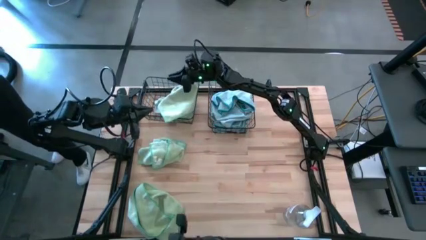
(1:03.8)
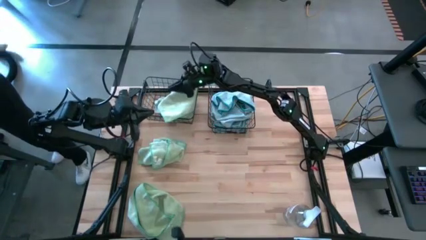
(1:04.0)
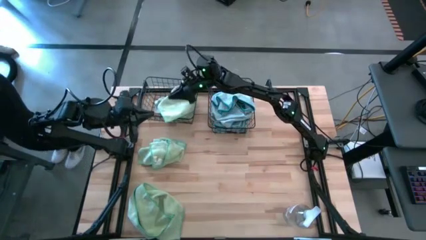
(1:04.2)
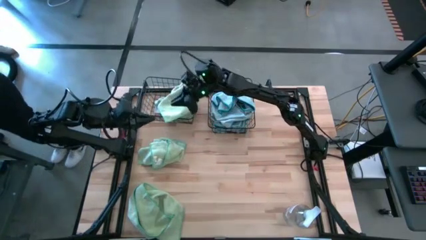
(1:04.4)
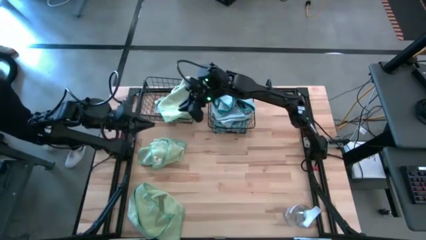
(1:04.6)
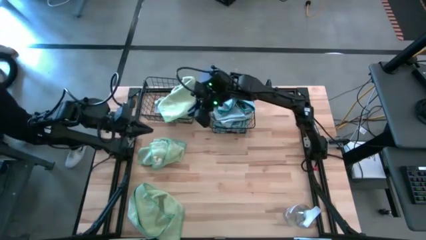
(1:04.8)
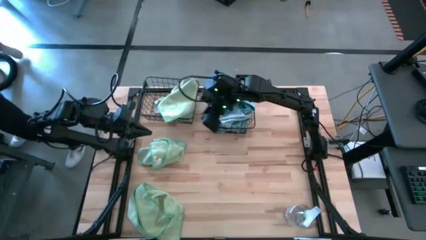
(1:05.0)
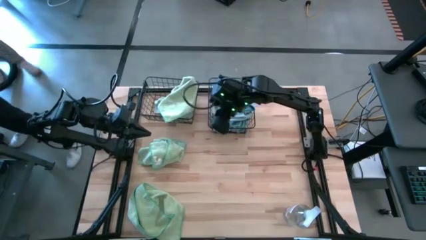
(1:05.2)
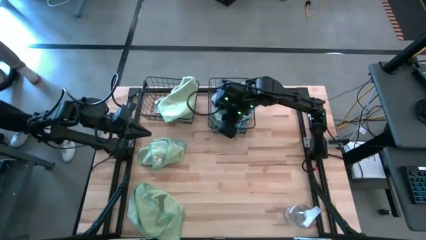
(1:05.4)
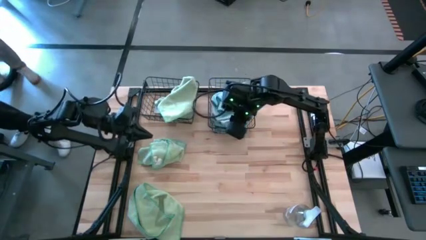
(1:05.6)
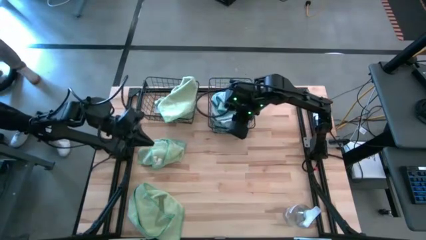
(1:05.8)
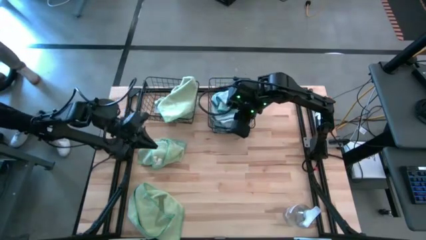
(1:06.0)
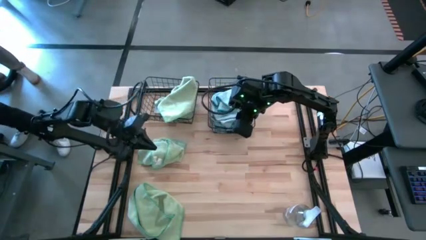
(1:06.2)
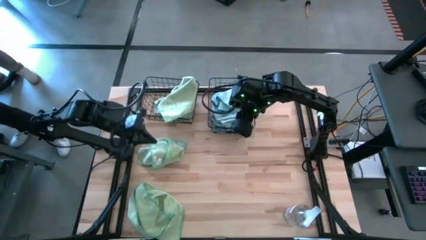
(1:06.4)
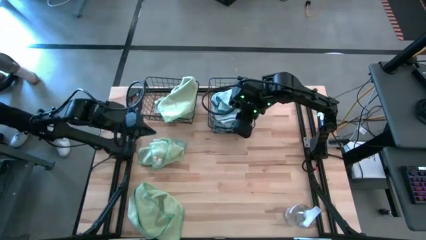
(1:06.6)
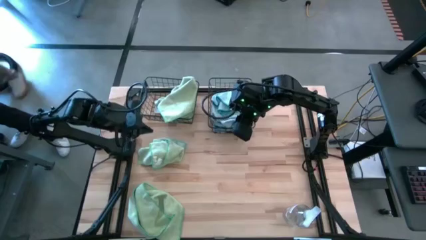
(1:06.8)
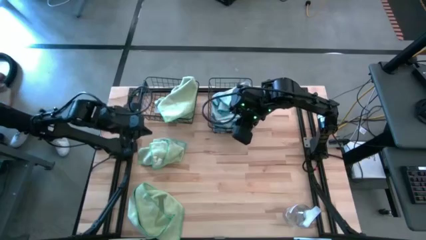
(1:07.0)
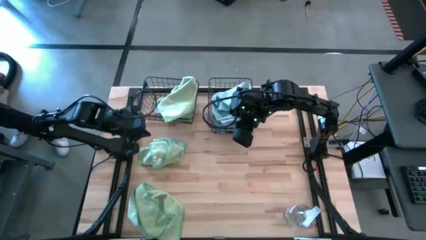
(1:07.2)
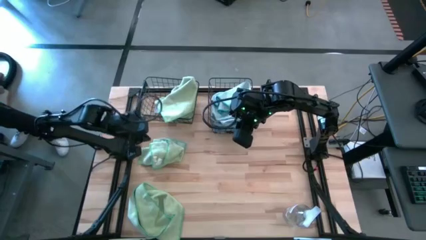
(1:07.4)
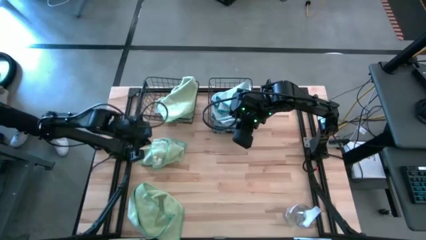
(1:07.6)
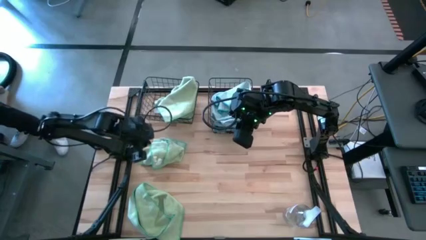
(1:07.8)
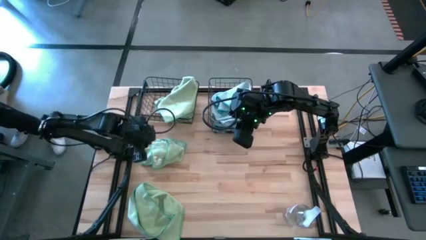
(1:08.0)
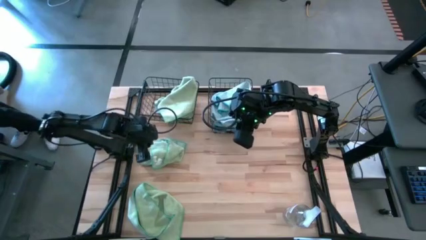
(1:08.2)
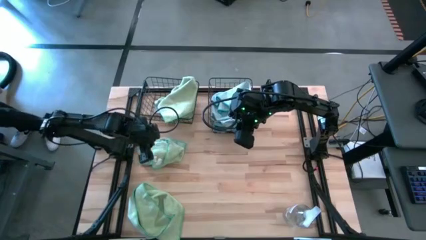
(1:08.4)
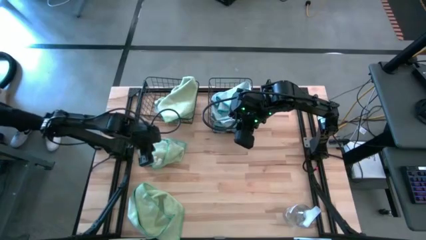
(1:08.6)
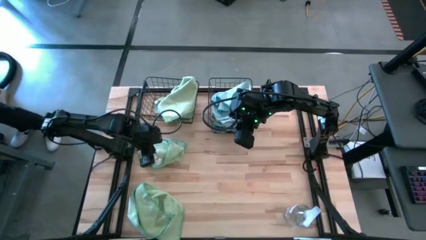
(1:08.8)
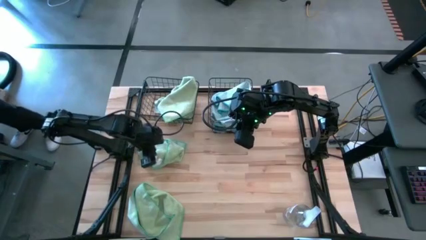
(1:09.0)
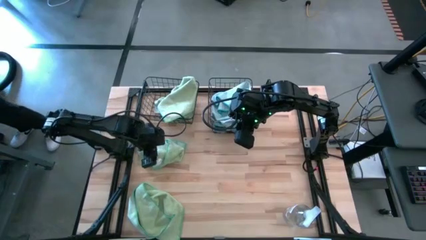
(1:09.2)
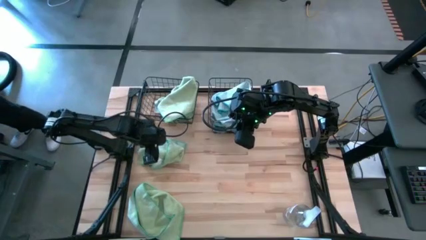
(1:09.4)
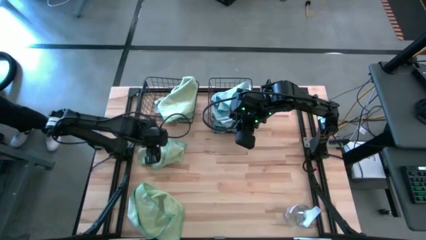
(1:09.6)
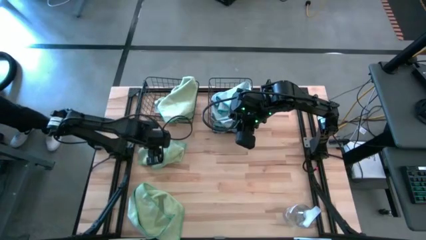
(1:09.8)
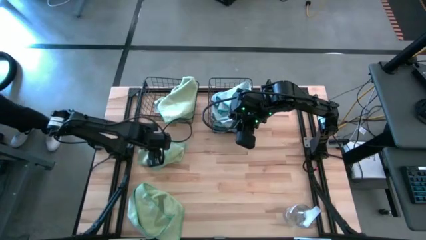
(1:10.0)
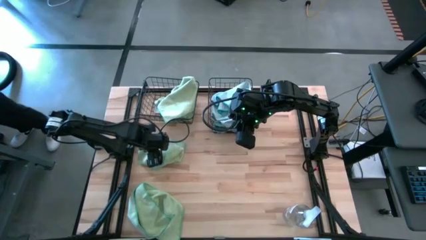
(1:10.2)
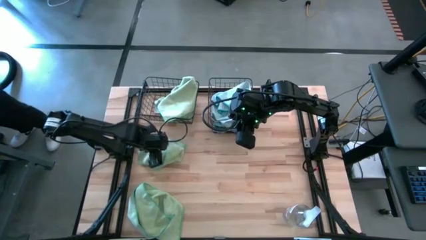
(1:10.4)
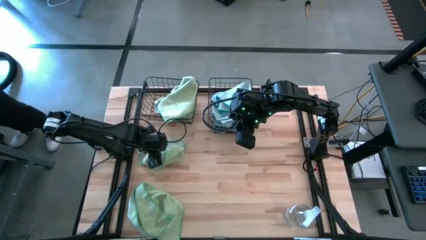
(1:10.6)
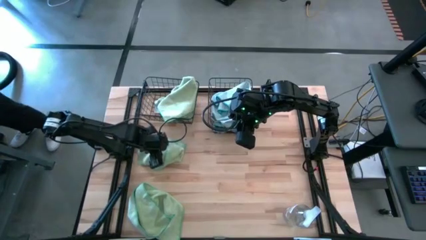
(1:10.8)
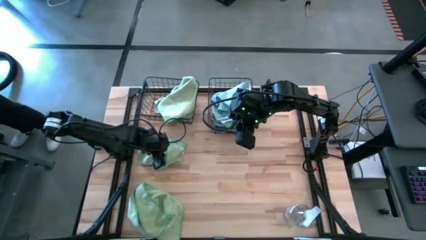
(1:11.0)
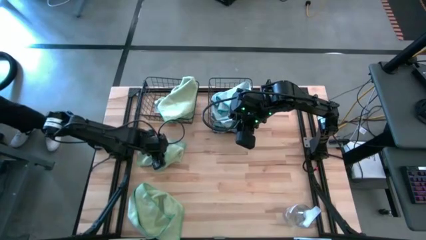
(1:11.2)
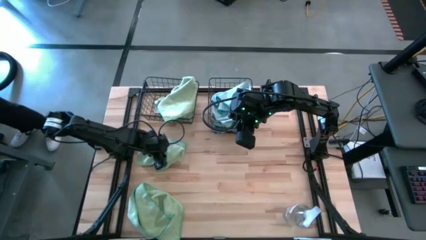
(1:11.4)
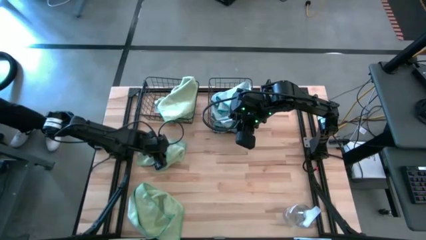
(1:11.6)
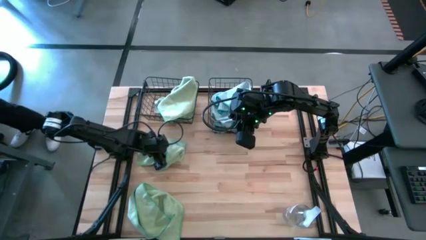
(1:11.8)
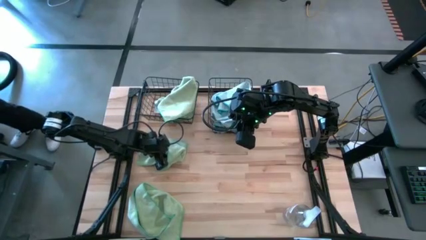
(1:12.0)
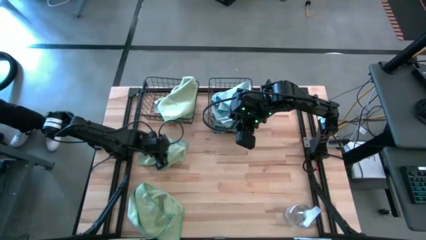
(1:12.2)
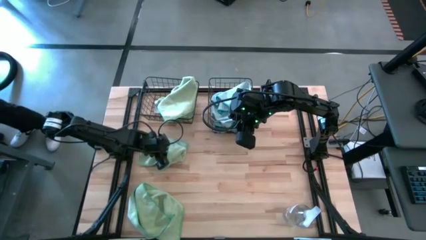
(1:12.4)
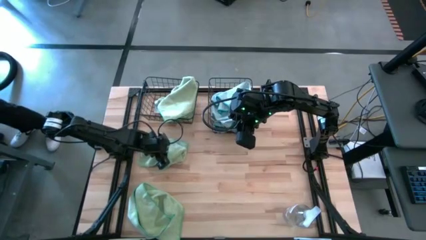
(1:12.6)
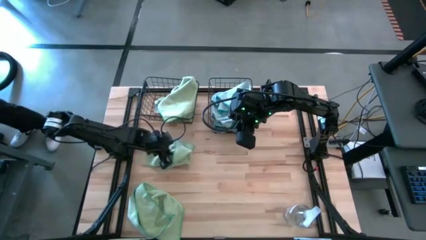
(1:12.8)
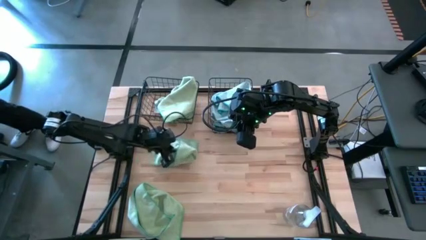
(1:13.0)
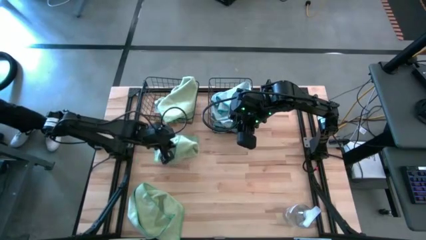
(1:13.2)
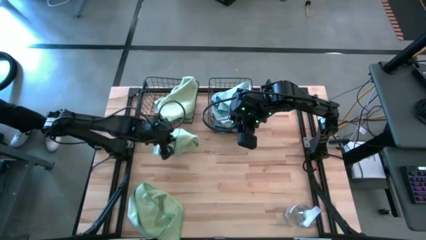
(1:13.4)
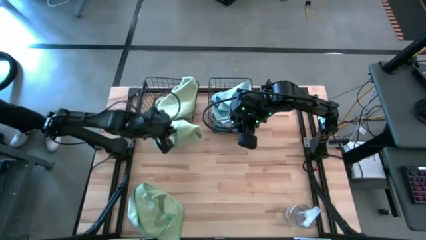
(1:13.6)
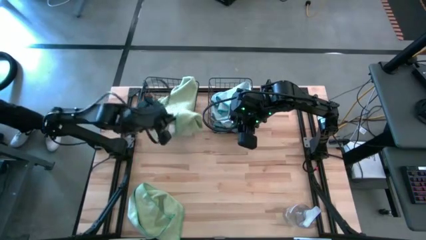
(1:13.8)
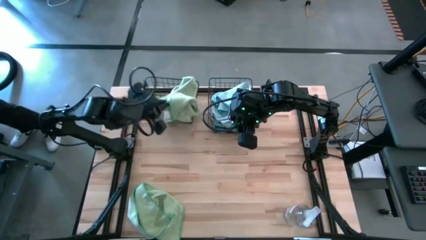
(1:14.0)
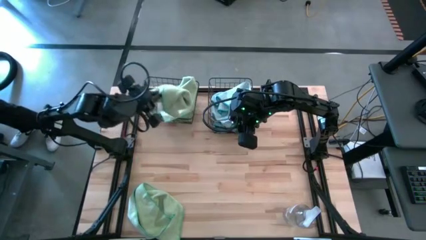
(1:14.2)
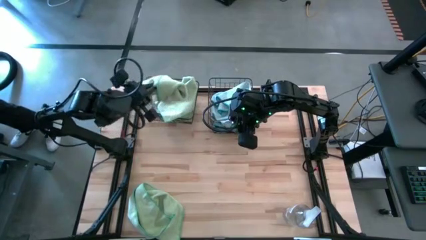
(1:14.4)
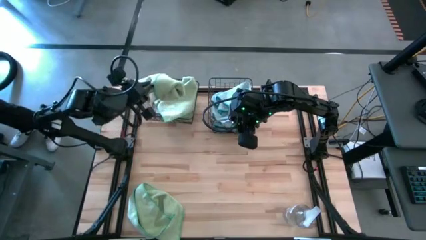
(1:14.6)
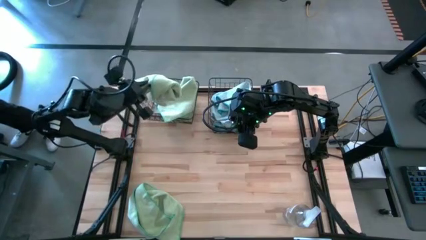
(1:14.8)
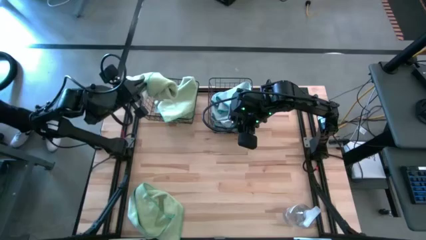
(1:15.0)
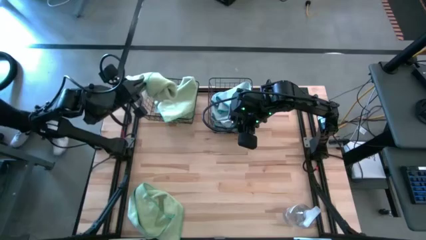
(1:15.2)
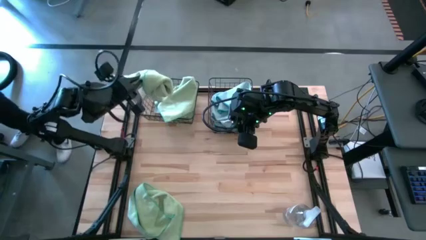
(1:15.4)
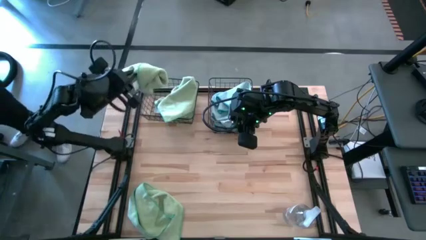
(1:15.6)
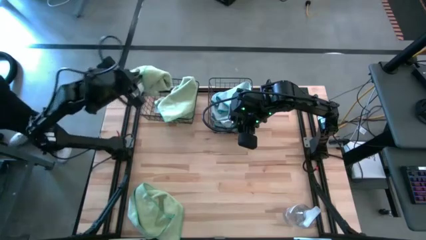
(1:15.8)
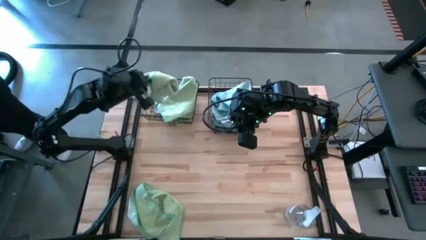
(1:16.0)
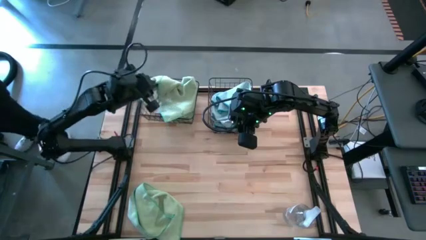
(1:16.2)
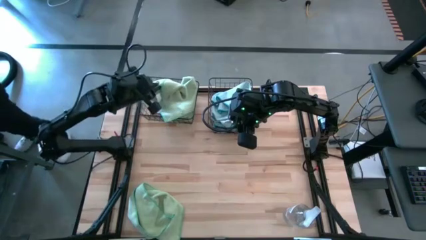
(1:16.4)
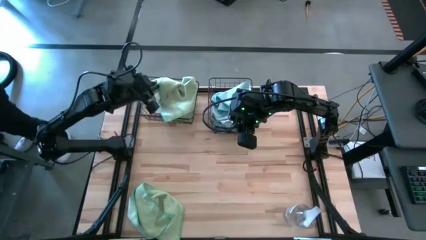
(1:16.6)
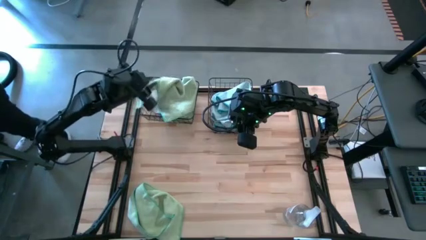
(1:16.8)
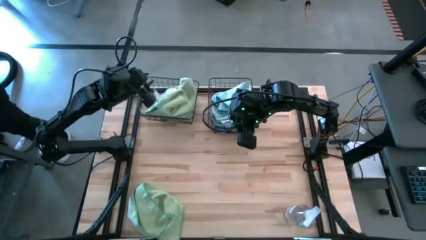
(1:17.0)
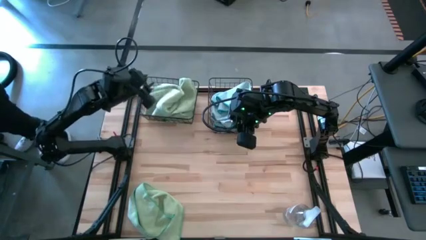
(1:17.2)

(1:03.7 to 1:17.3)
Task: Sort microfiber towel by color & place in baskets
Put the green towel into the left wire basket

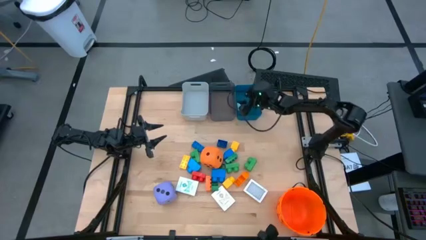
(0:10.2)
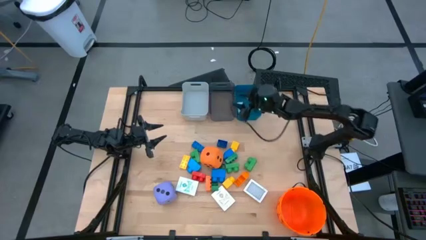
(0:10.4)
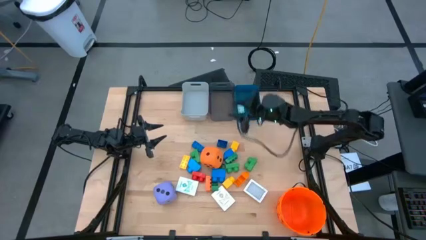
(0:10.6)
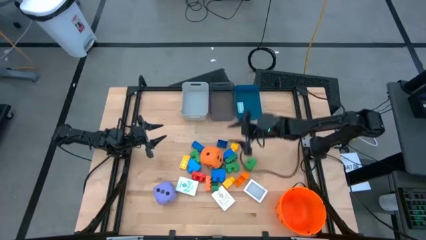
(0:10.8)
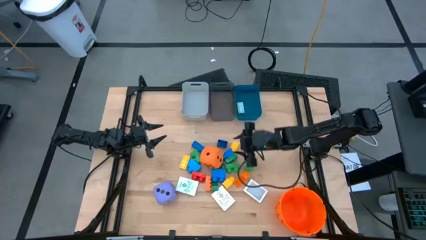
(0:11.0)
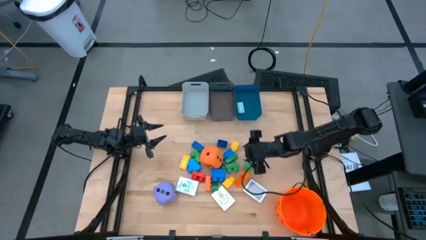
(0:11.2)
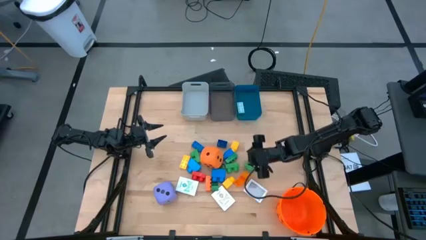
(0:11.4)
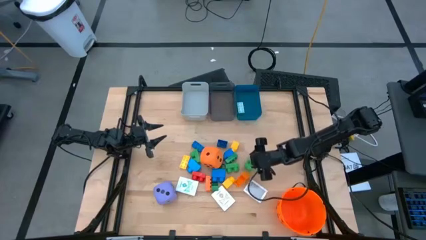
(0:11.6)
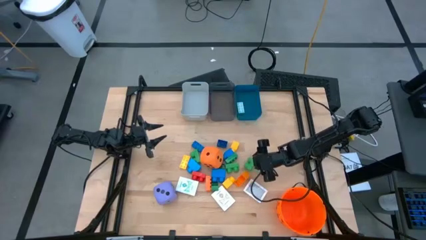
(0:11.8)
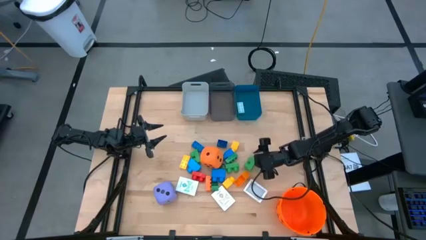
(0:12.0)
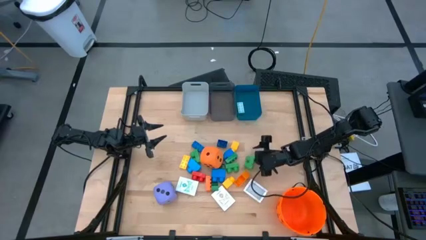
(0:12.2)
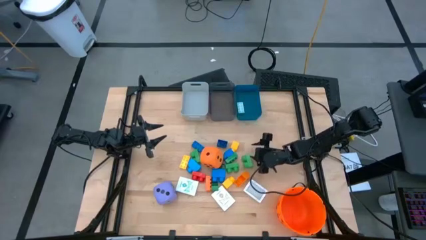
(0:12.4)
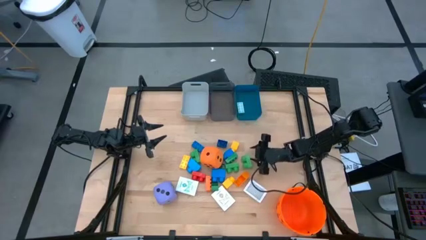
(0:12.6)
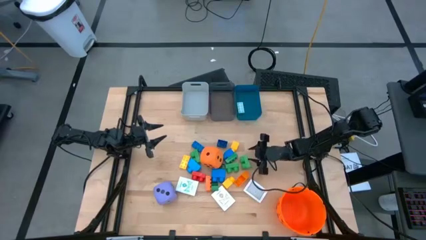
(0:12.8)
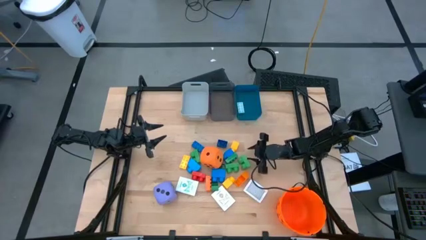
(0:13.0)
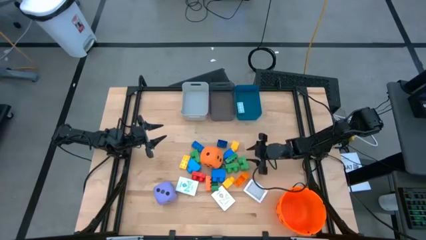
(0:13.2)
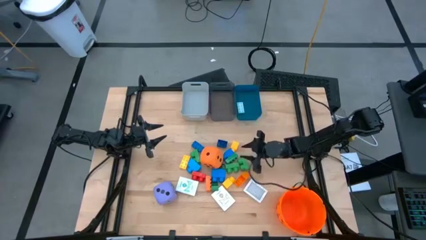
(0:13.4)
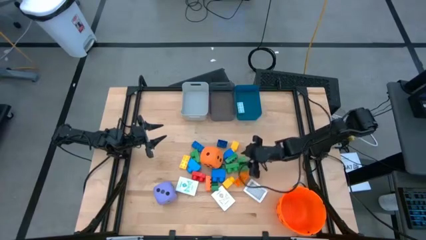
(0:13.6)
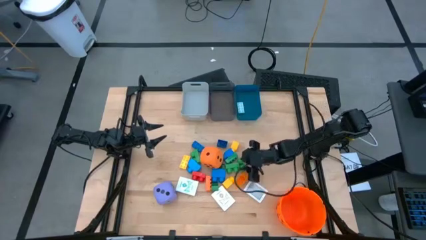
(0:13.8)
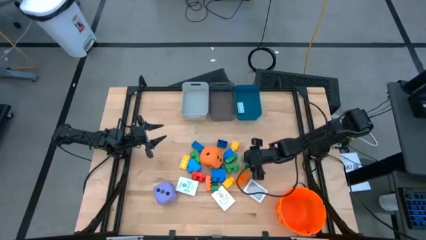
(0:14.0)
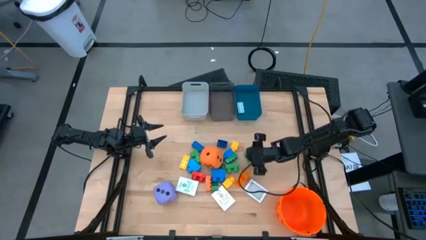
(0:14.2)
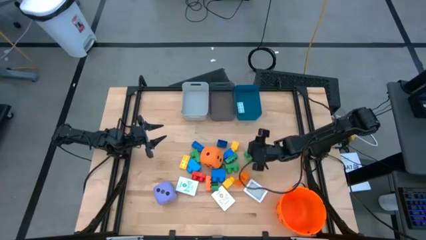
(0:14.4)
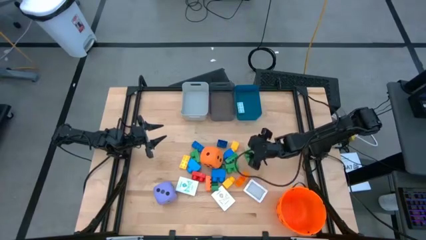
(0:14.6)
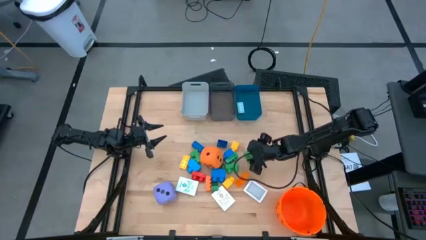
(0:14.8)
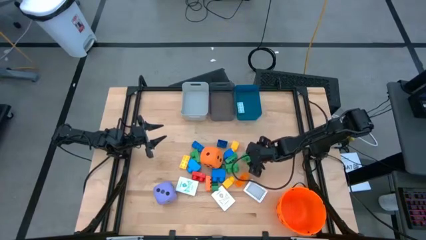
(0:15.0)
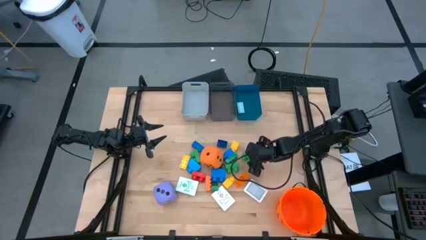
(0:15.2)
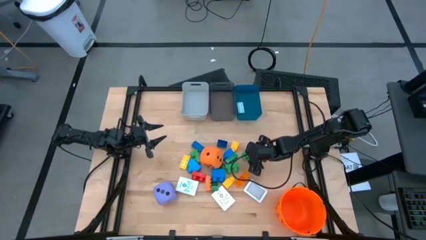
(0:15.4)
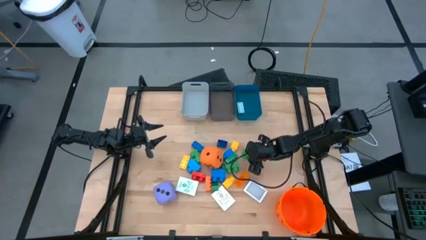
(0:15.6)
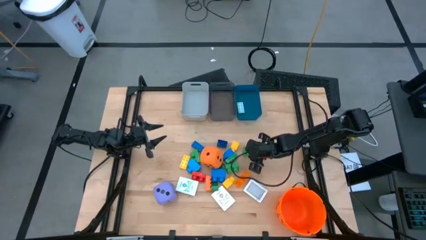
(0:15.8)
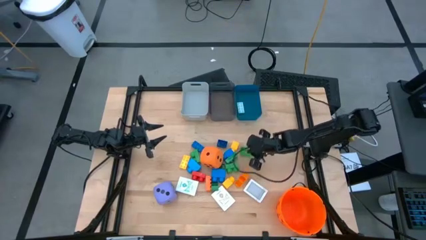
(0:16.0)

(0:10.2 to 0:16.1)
Task: Pick & Place Toys
Put the green game piece into the blue bin
